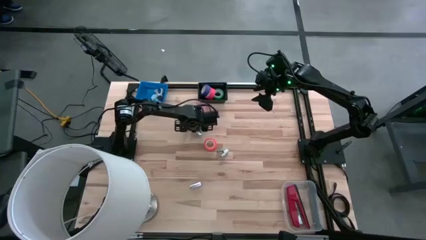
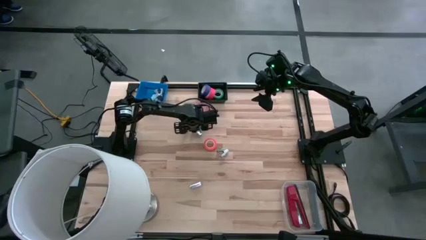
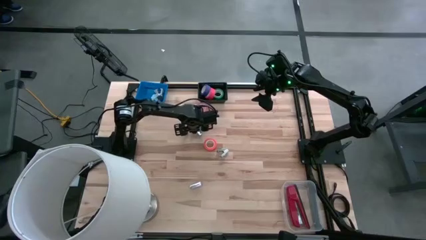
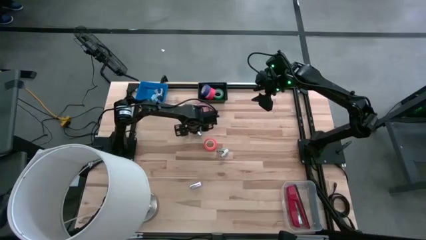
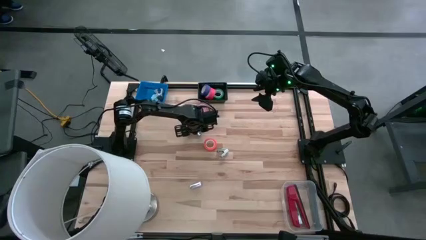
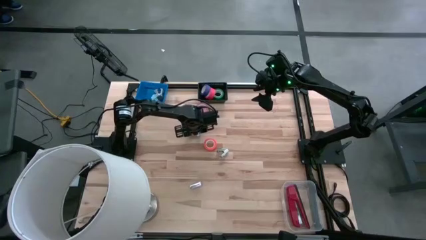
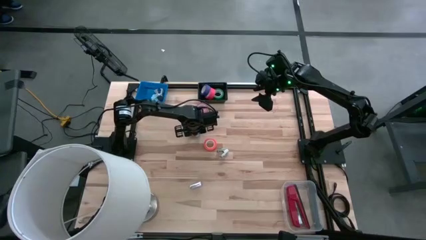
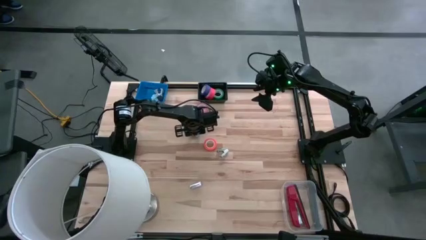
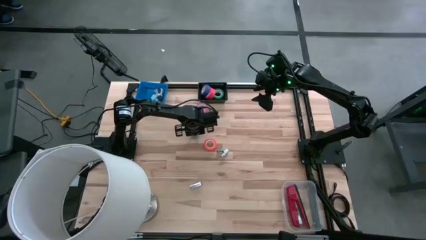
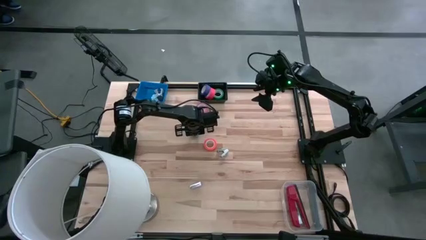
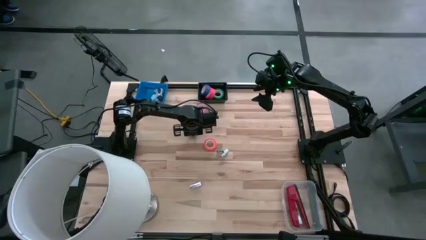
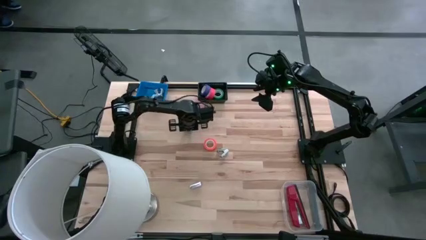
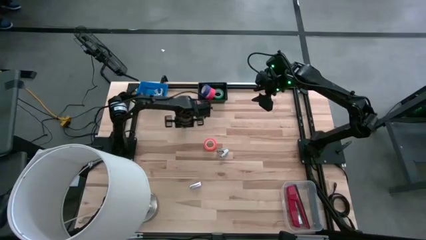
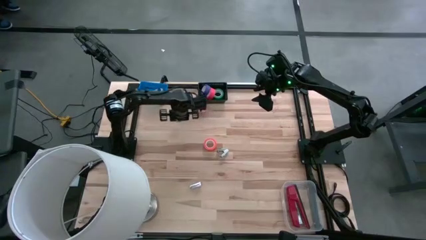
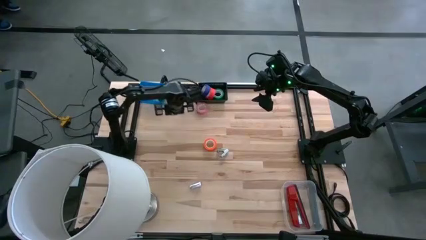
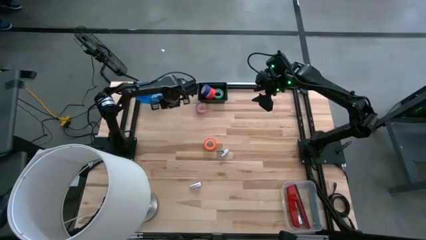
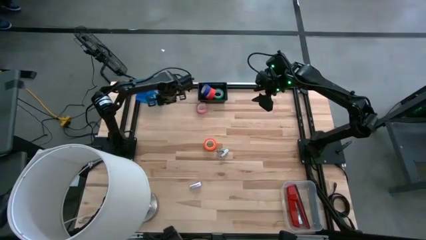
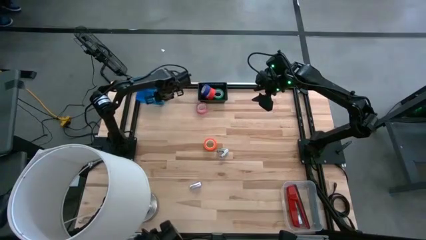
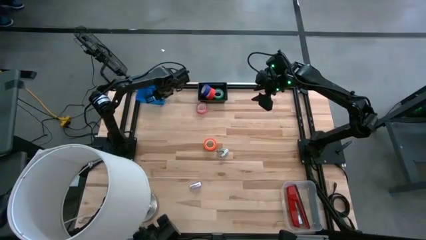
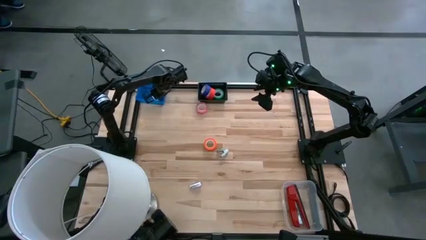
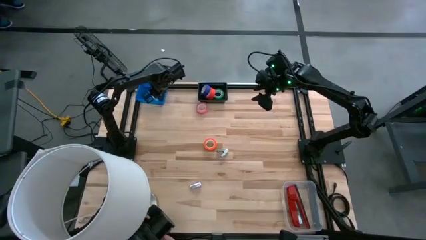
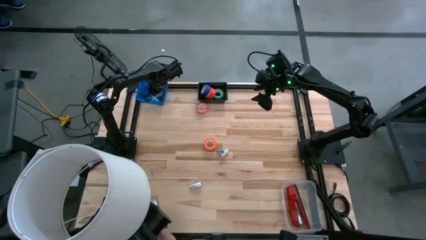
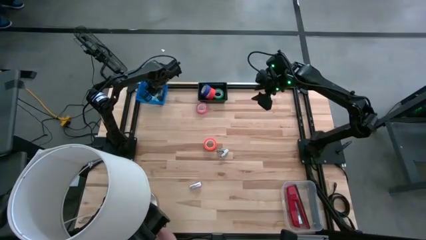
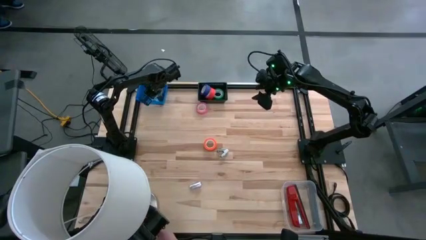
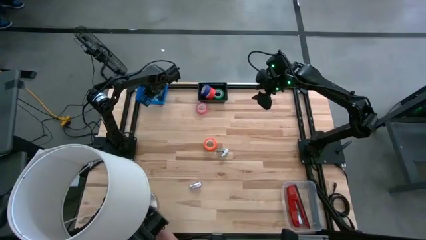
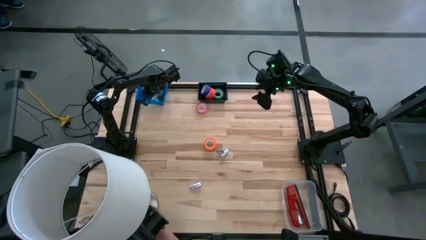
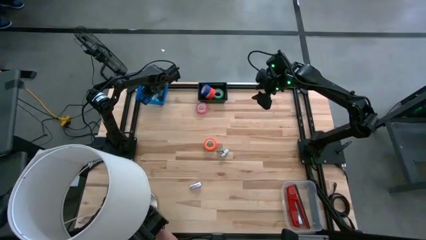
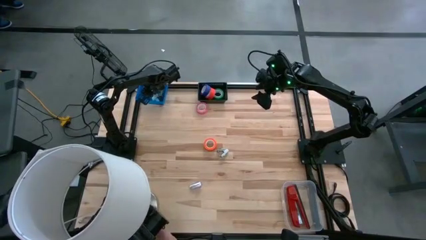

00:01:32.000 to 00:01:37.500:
Task: Pick and place Stapler, Stapler remover, tape
Put the light blue staple remover into the blue bin

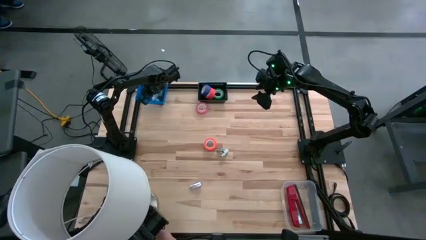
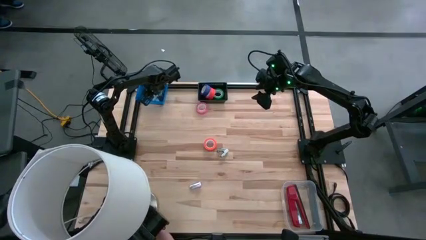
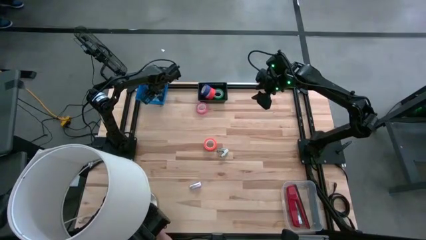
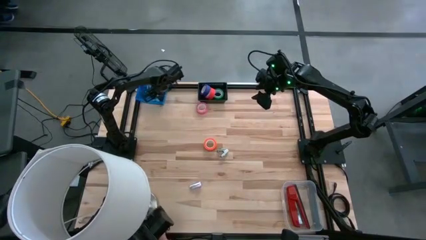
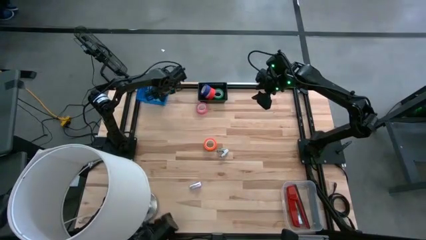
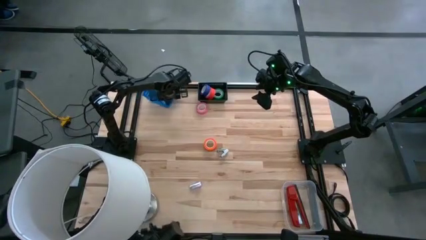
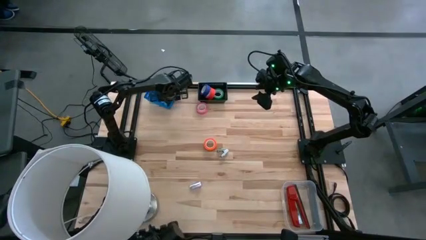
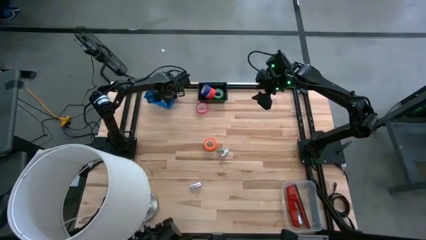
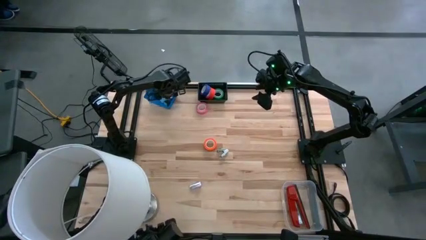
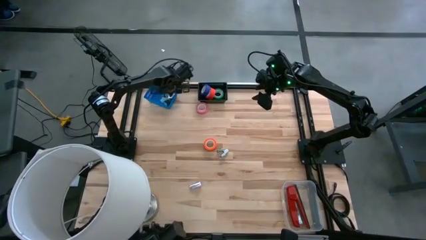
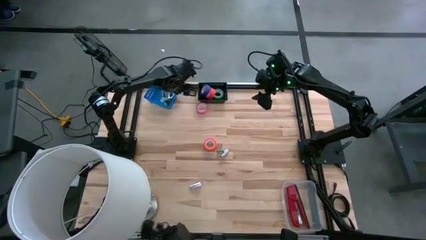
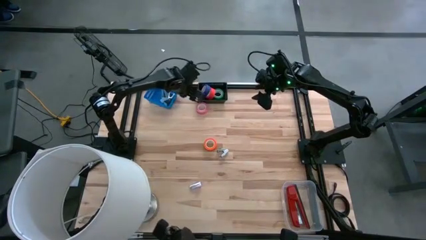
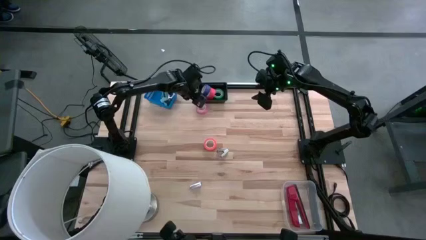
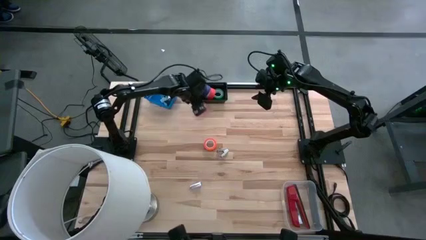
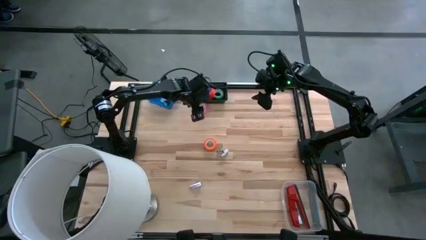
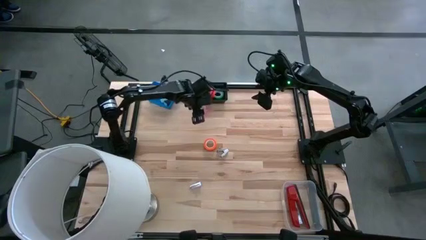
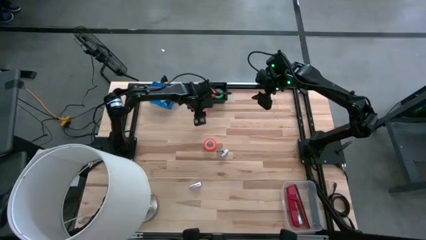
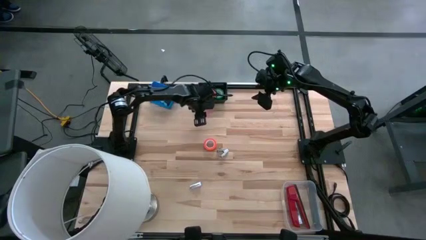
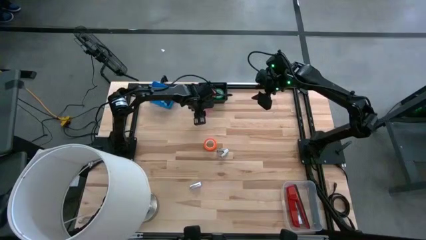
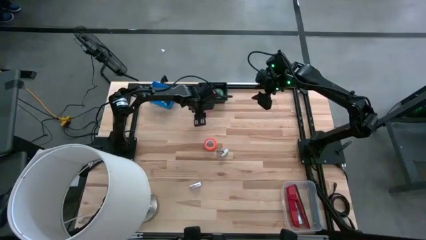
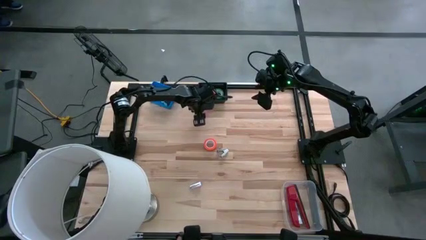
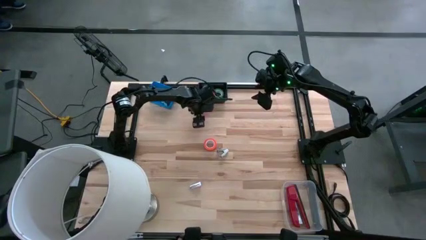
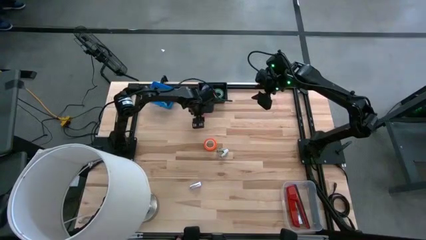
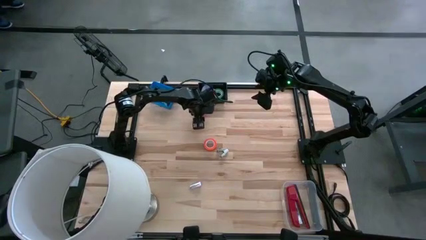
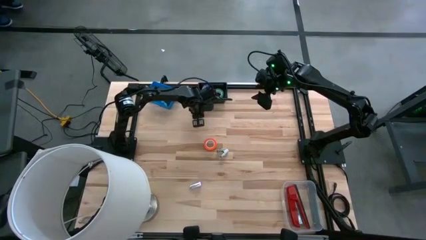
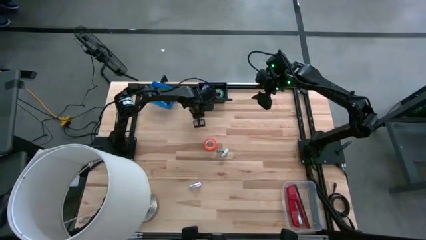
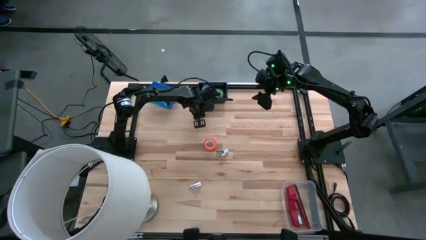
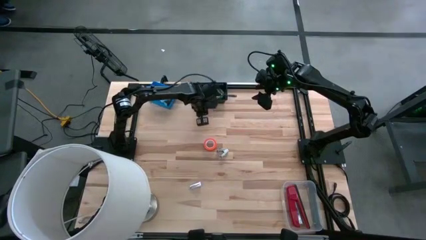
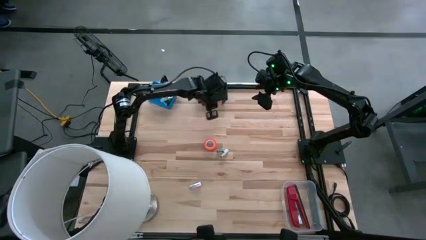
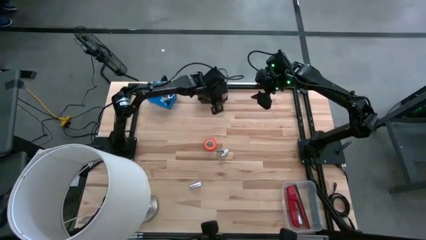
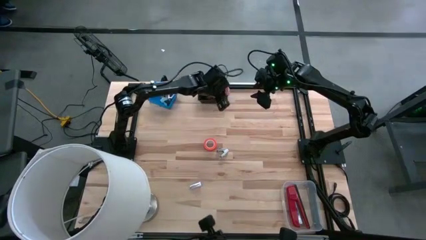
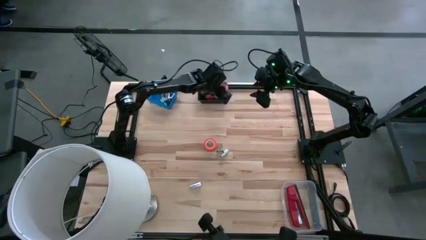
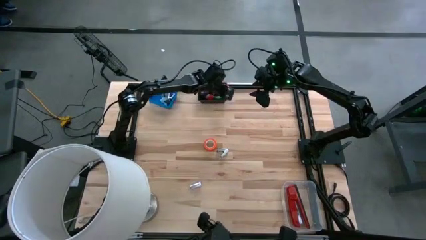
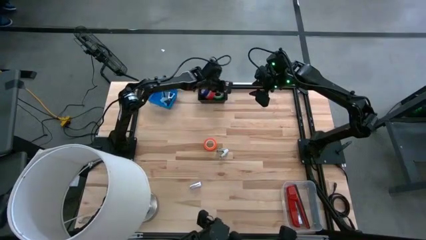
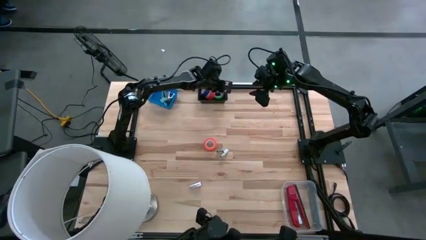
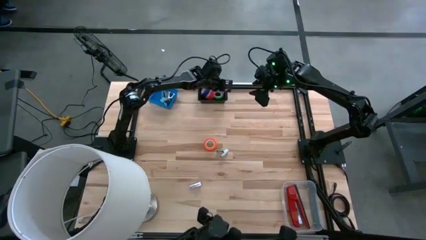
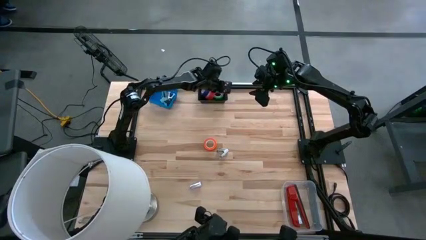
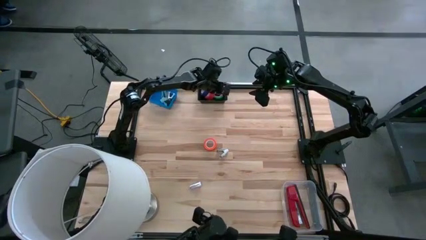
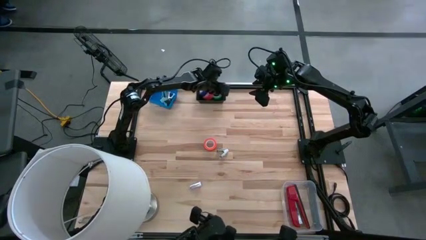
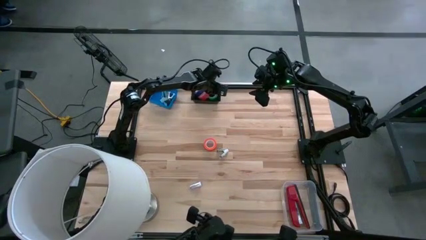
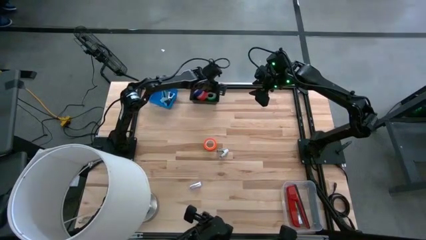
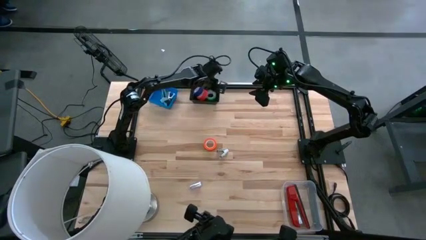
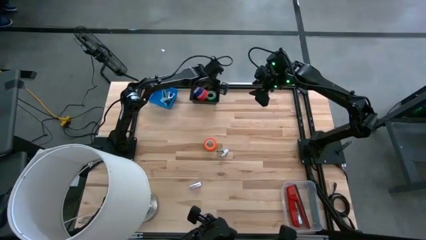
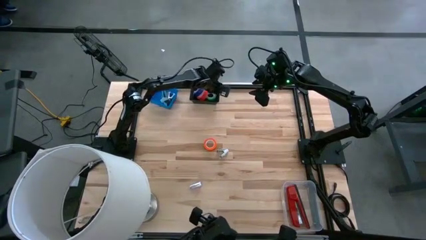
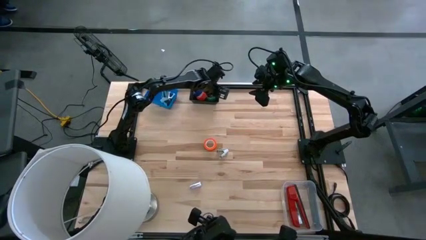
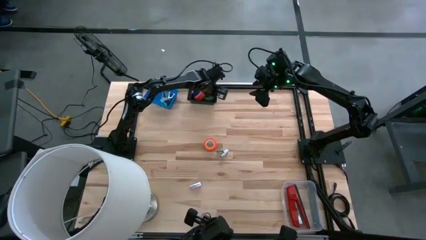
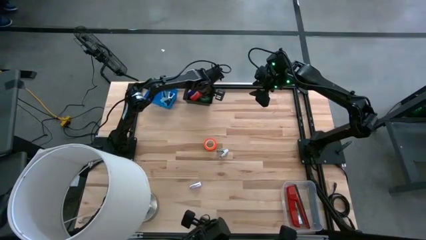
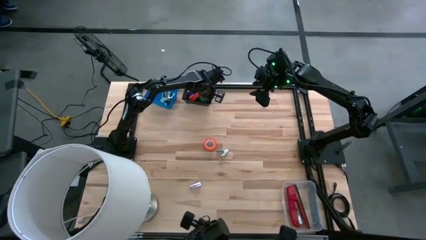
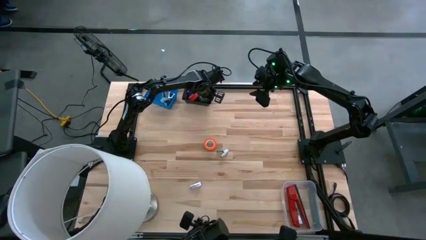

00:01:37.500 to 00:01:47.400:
Put the pink tape into the black bin

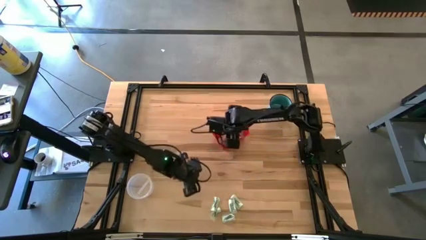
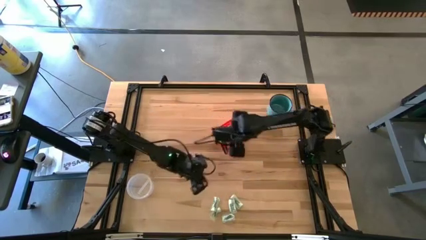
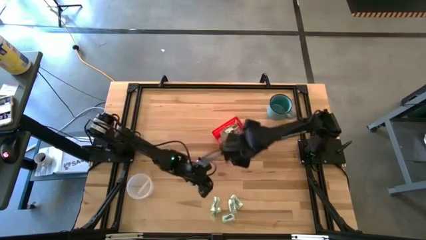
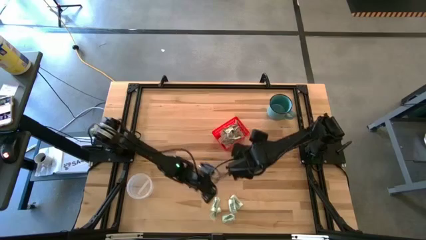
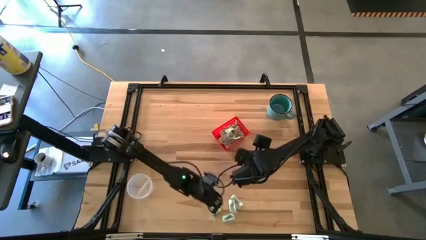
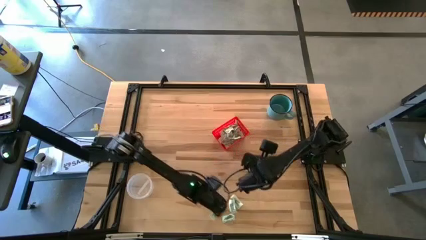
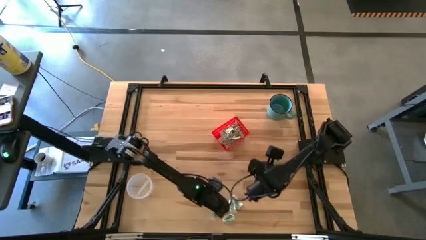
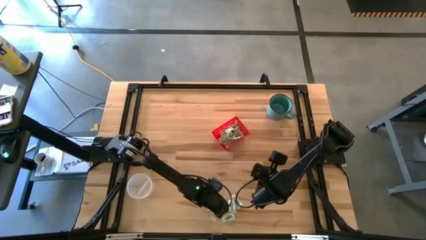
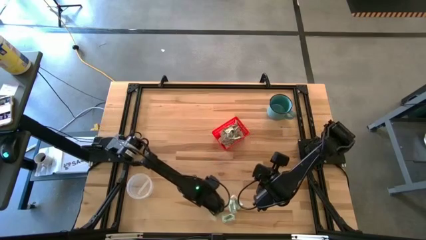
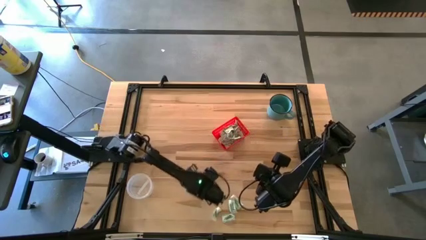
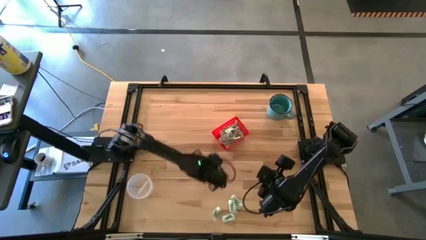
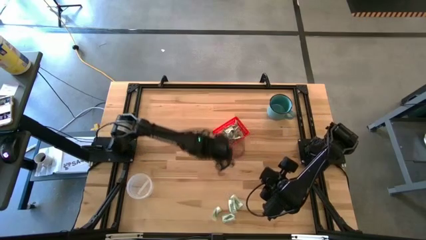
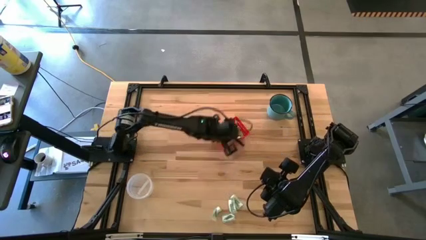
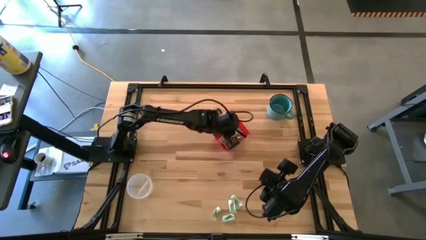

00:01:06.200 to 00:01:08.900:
Task: Pick and place items into bin
Put the stevia packet into the red bin
